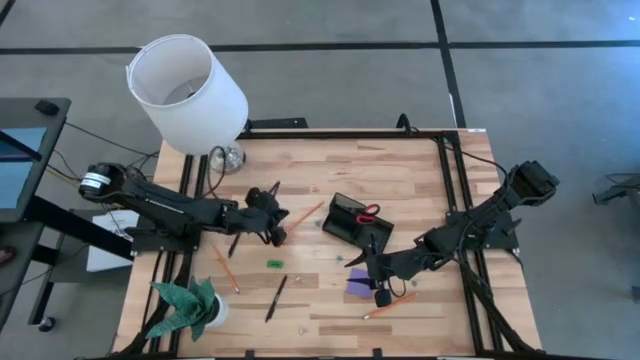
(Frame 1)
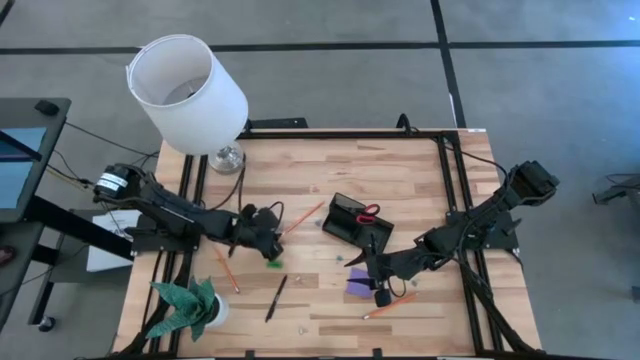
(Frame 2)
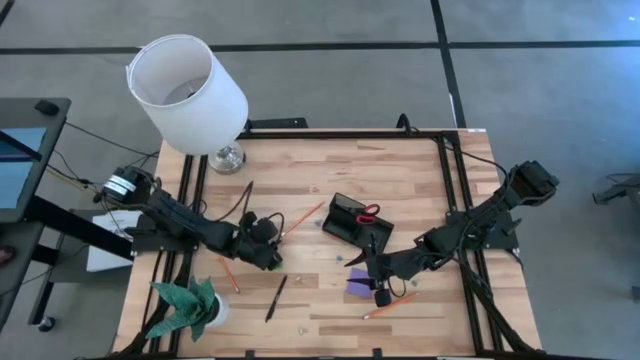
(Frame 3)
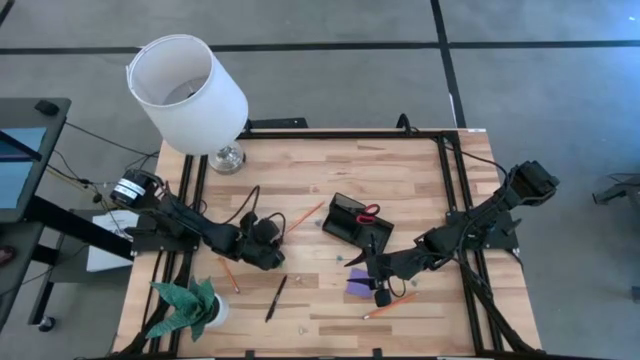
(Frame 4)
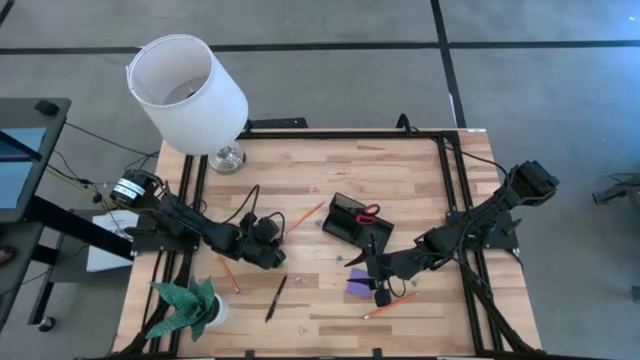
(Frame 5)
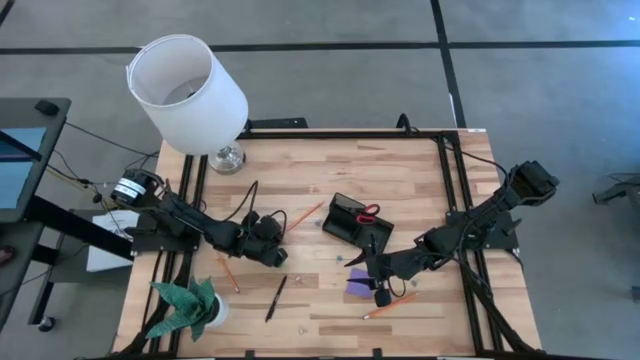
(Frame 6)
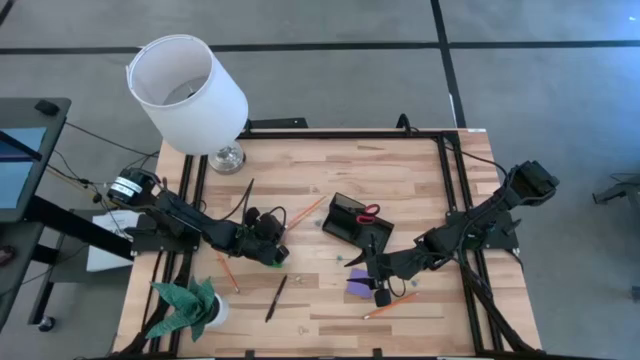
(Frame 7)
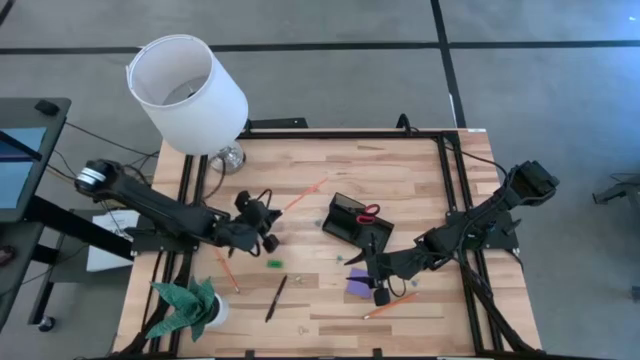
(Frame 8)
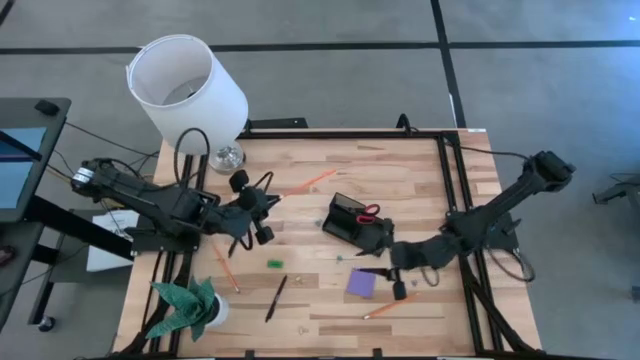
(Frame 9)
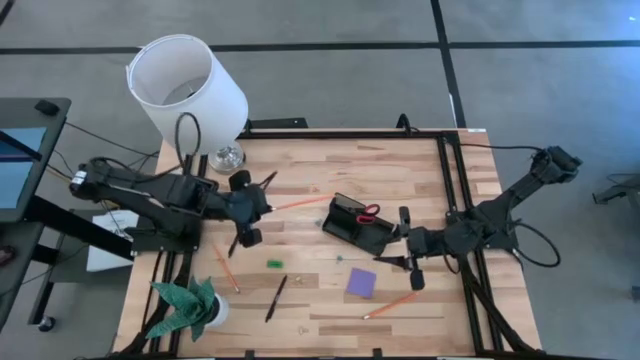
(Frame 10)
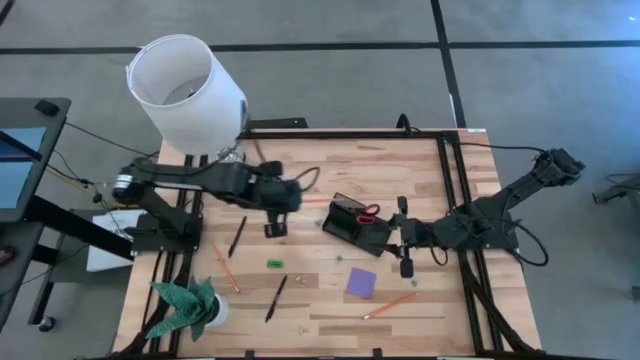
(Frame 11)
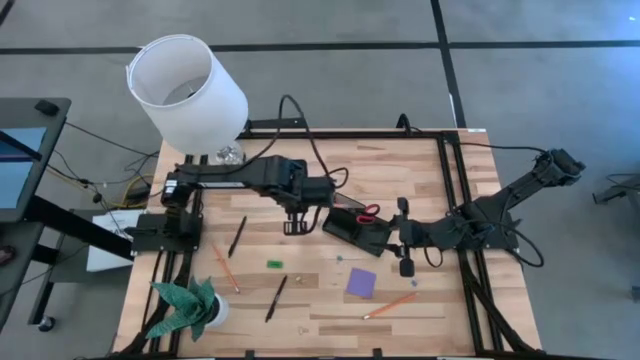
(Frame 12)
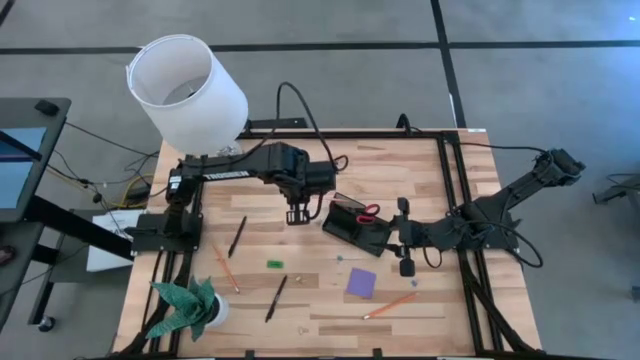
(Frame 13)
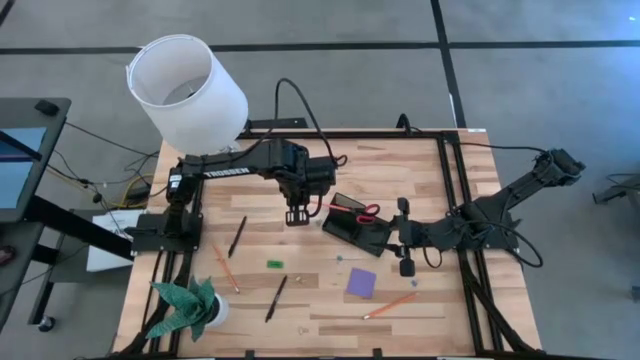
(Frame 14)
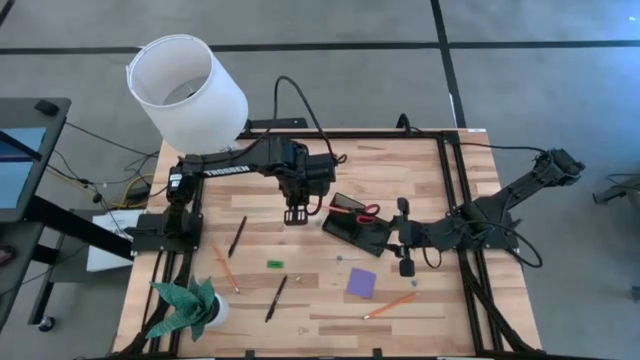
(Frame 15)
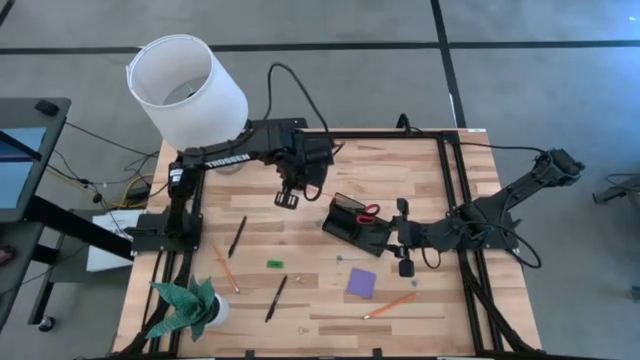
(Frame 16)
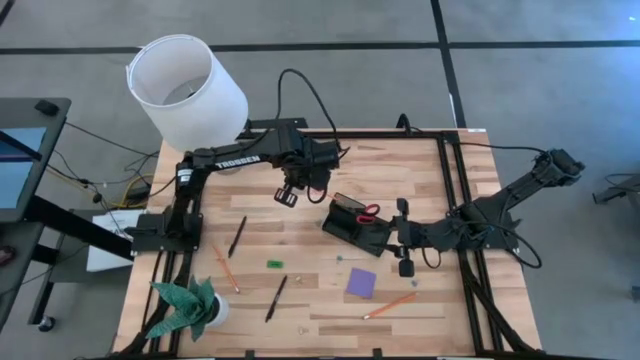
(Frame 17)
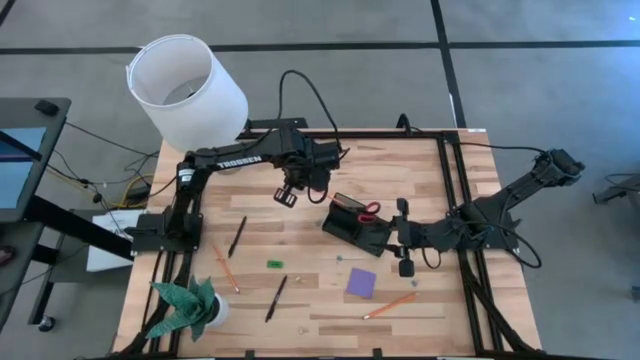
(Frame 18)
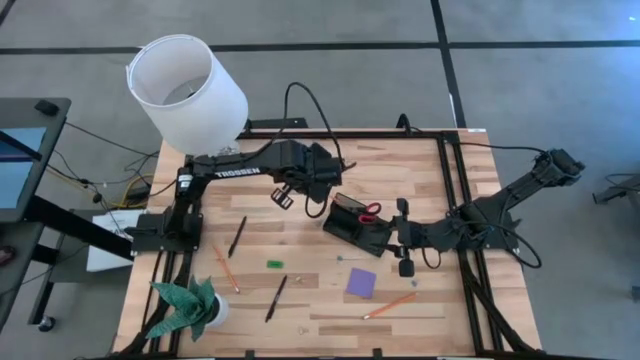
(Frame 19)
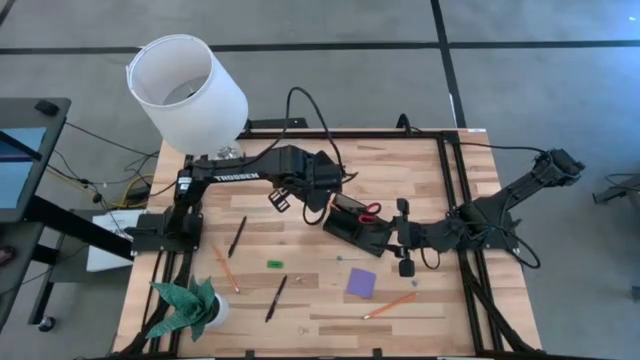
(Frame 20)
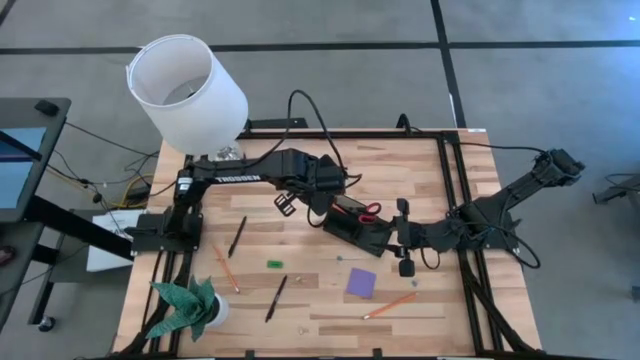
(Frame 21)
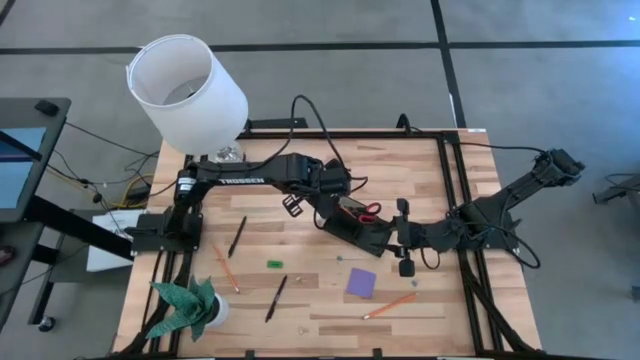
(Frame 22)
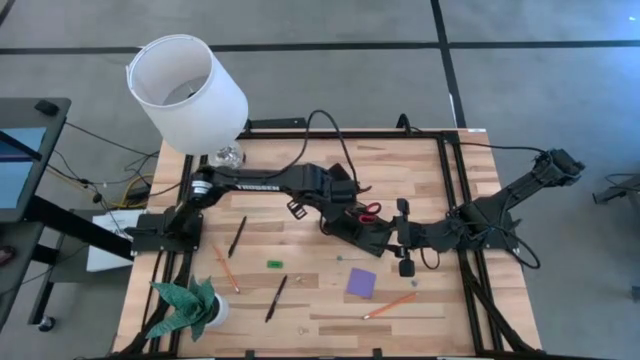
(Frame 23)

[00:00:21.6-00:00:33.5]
Task: Pick and place office supplies into organizer
Put the orange pencil into the black desk organizer

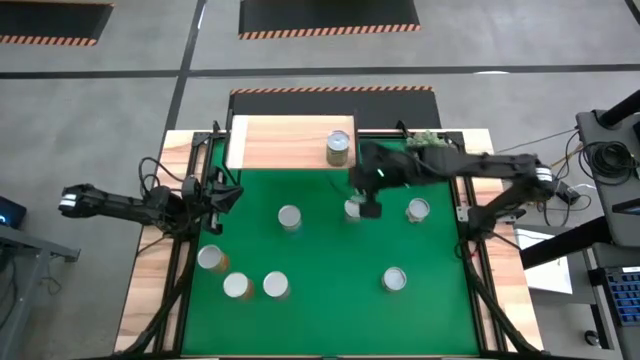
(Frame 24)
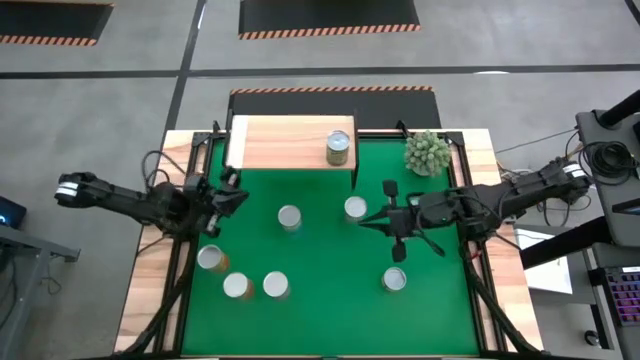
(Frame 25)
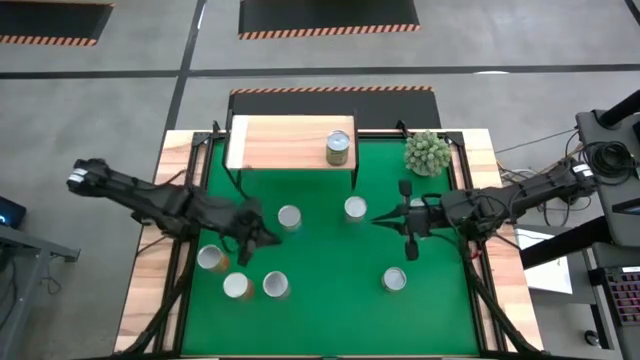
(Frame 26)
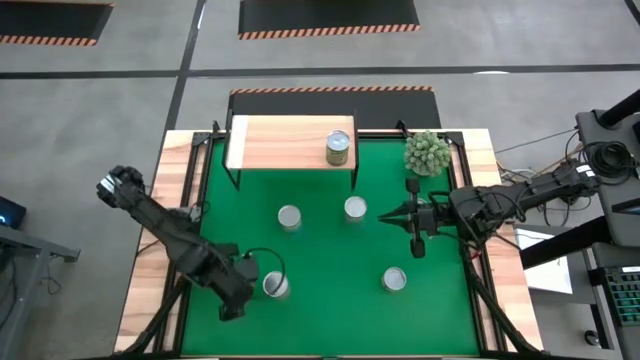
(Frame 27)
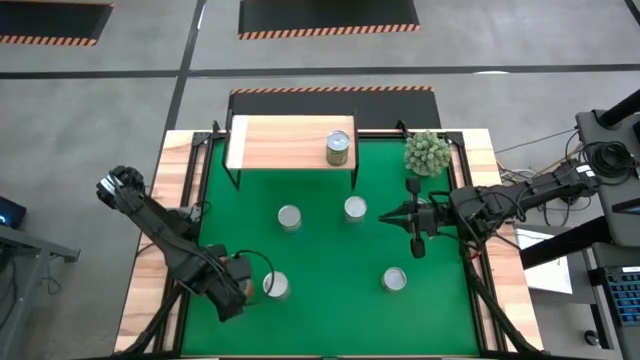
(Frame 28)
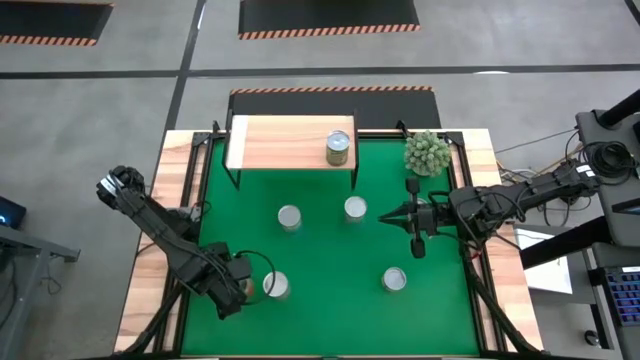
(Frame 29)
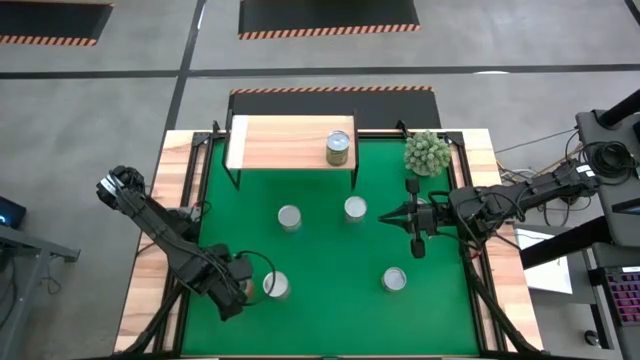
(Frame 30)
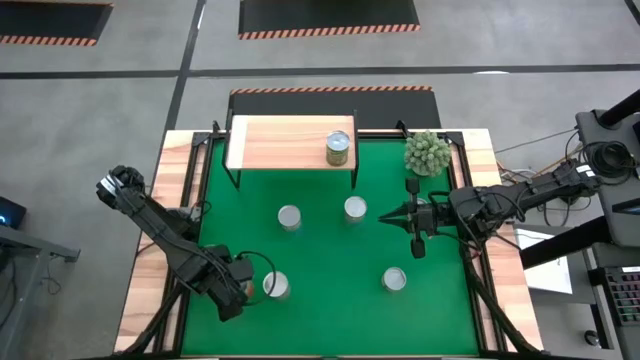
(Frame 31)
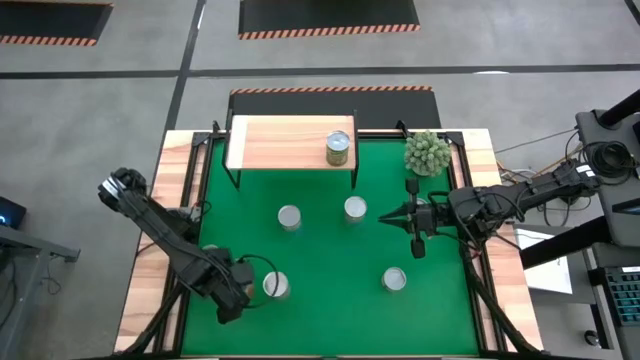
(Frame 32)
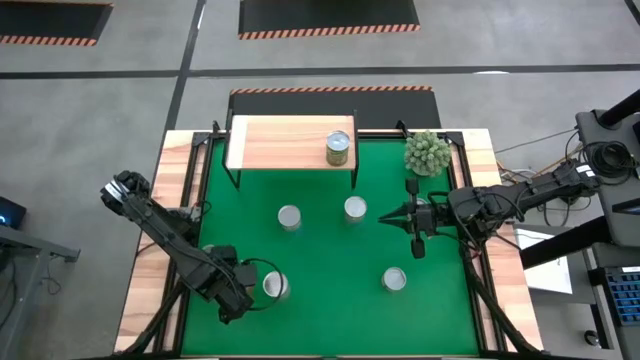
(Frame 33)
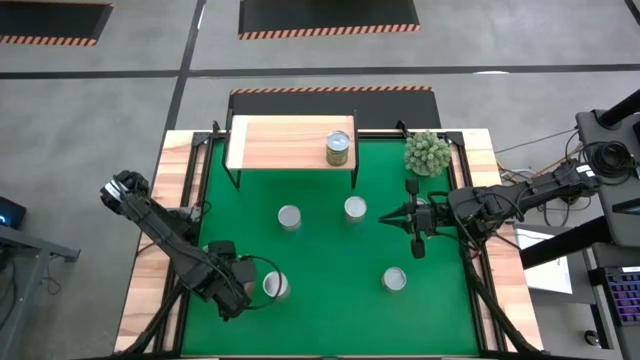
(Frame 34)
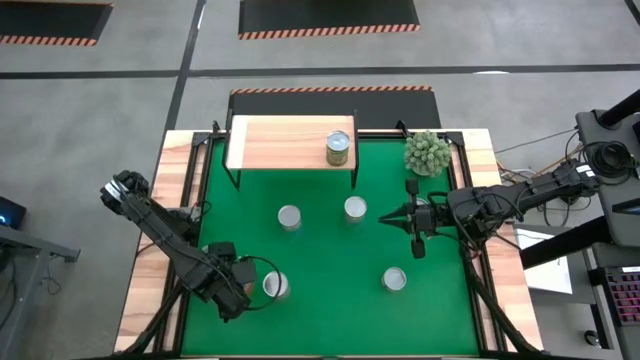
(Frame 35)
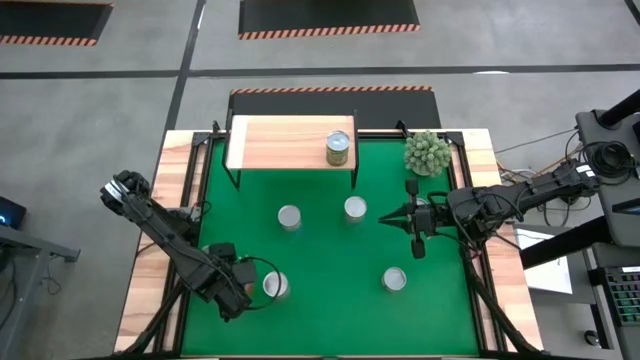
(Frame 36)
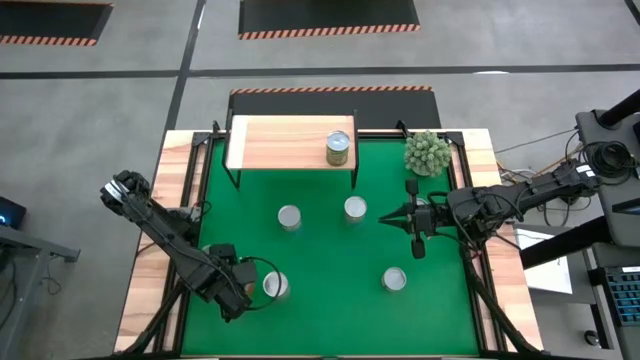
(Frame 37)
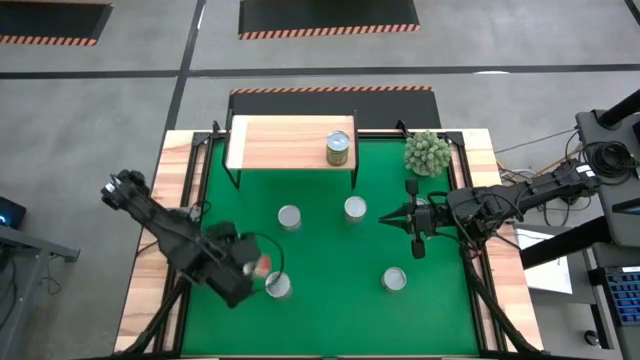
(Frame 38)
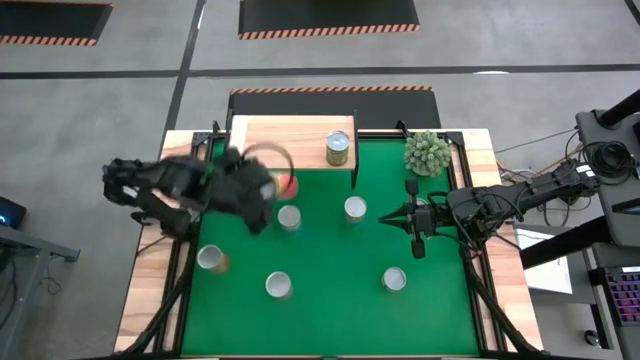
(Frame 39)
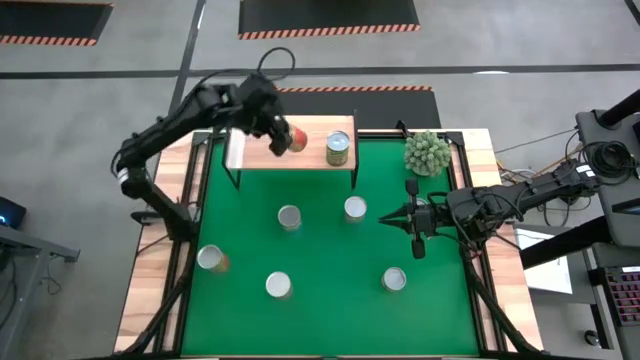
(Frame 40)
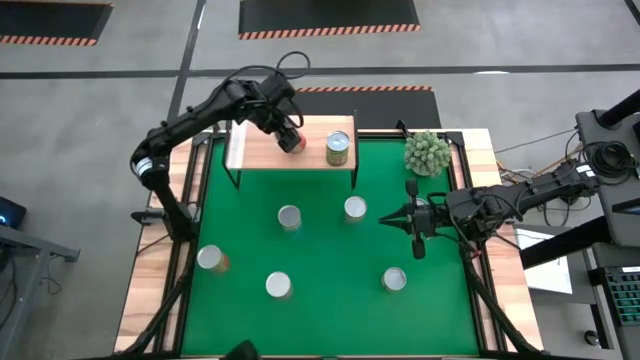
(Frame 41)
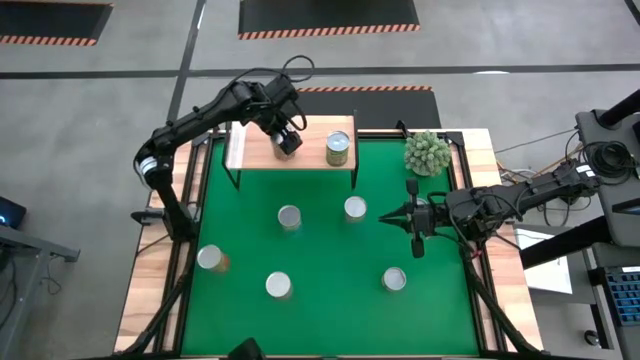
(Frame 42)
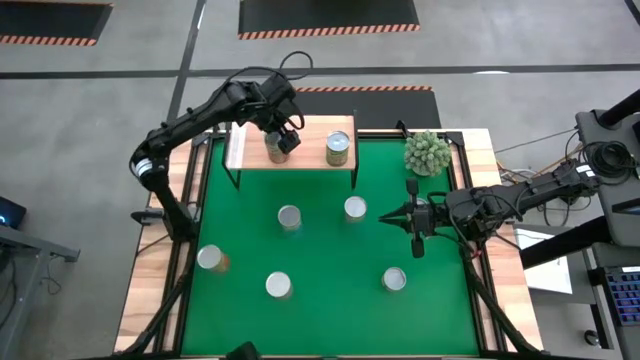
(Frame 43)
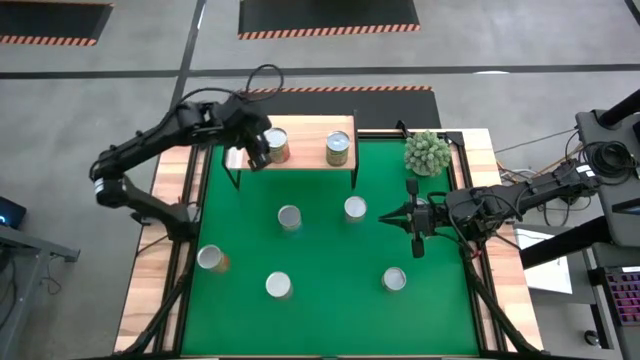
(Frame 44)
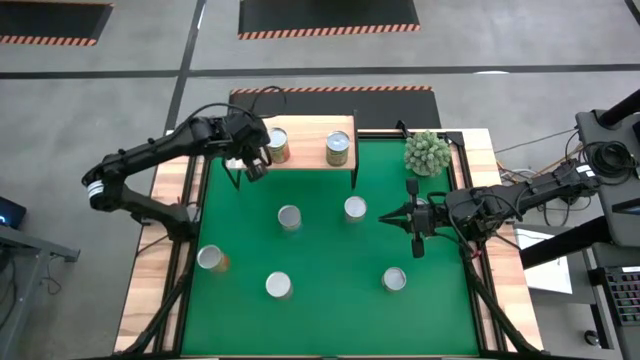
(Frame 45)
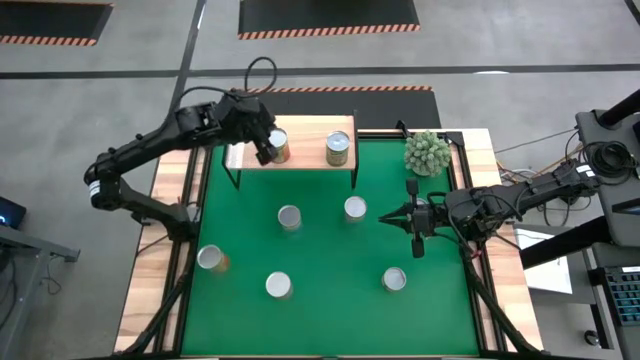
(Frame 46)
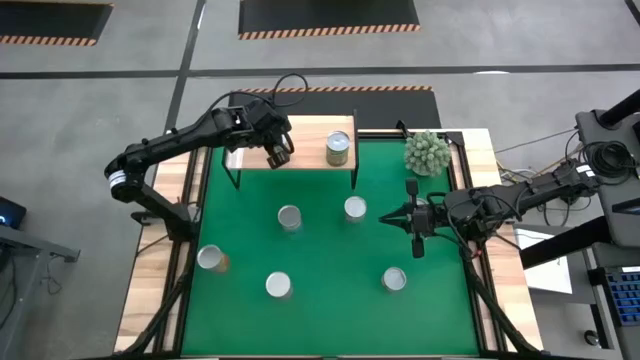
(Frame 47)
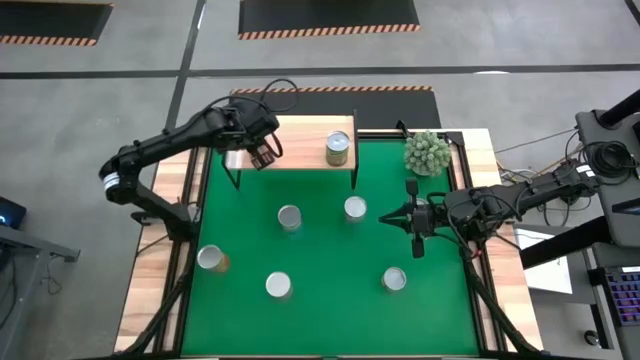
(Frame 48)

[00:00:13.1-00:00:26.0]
Task: Pick and place cans onto a shelf
Put the bottom canned pineapple on the shelf
